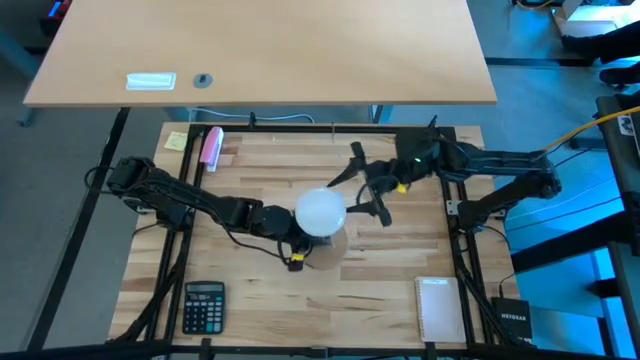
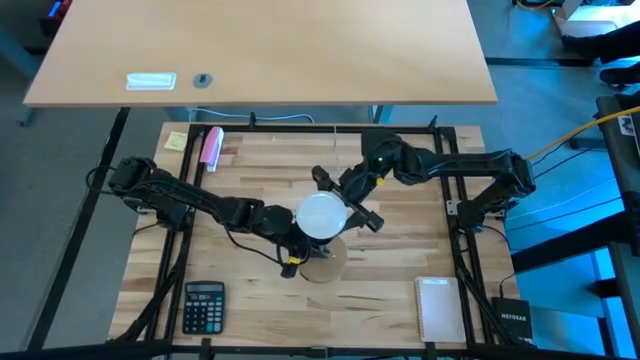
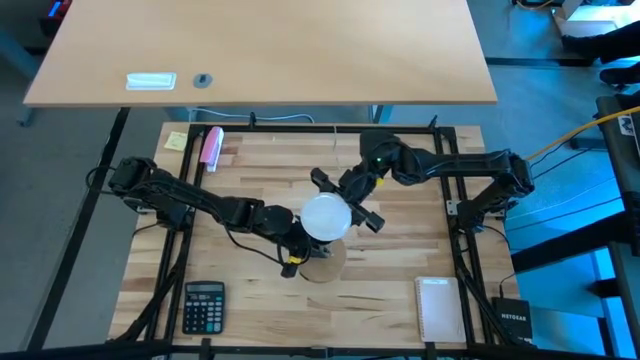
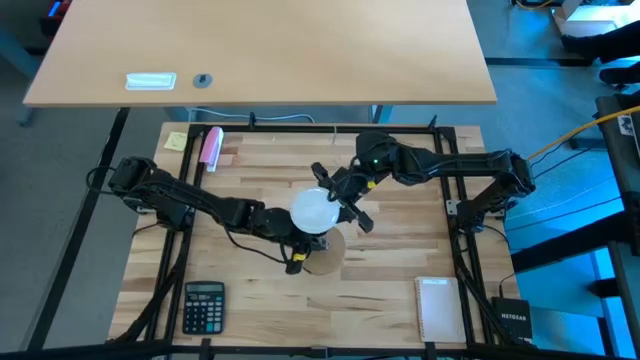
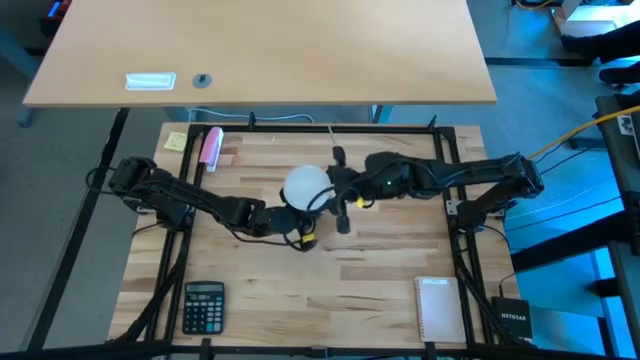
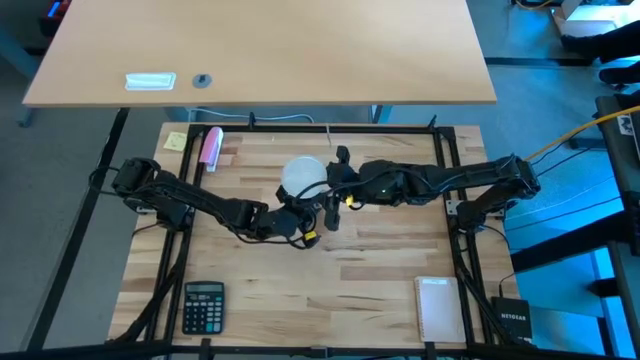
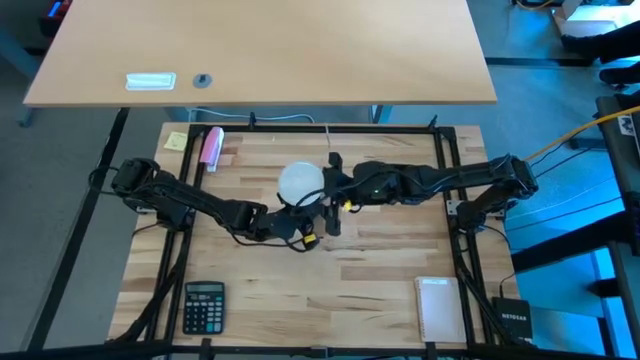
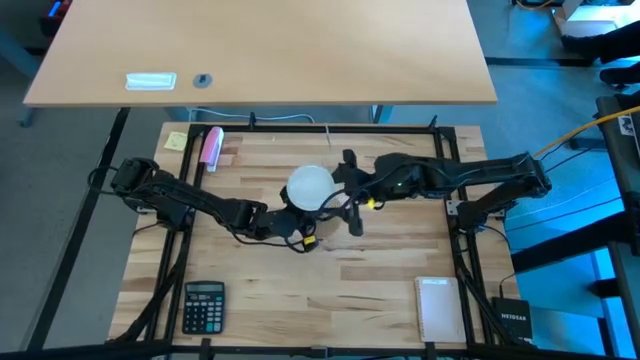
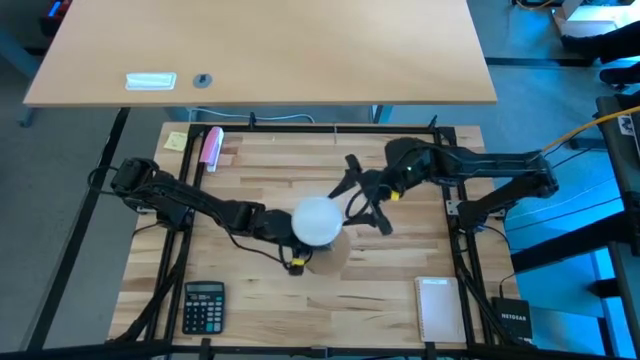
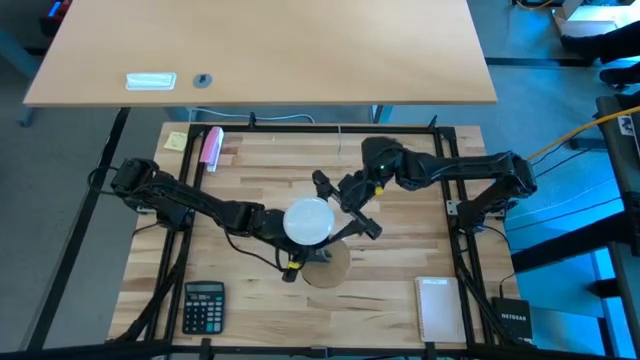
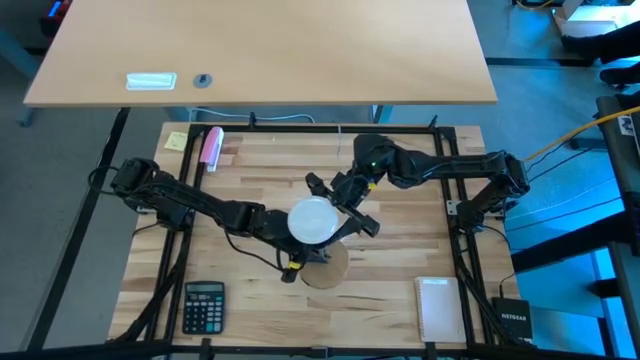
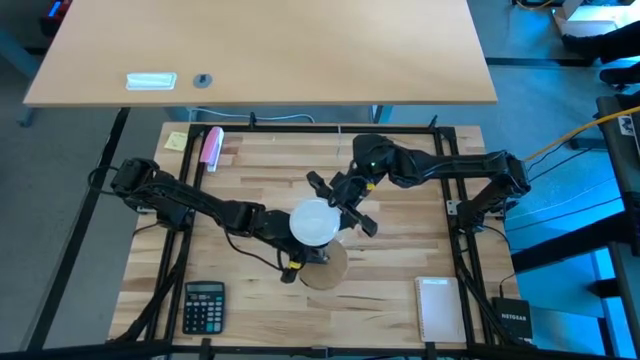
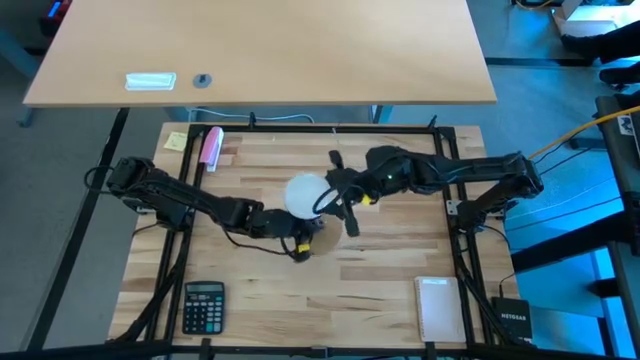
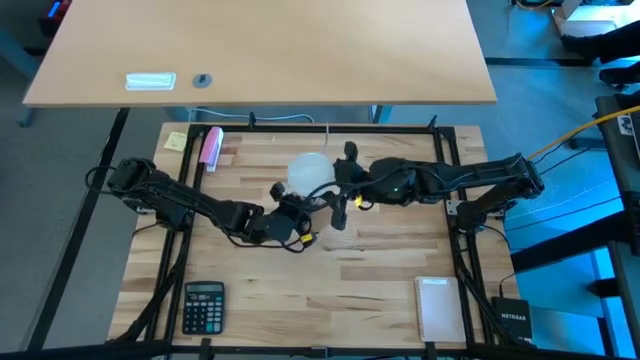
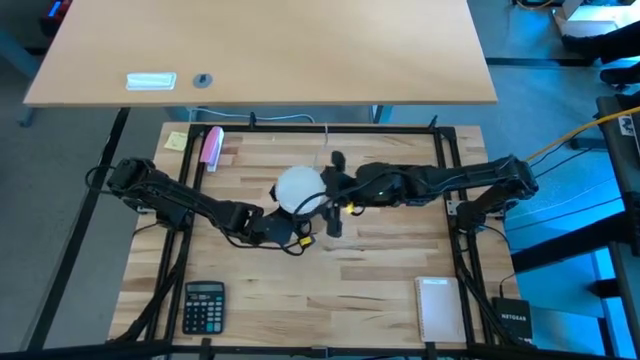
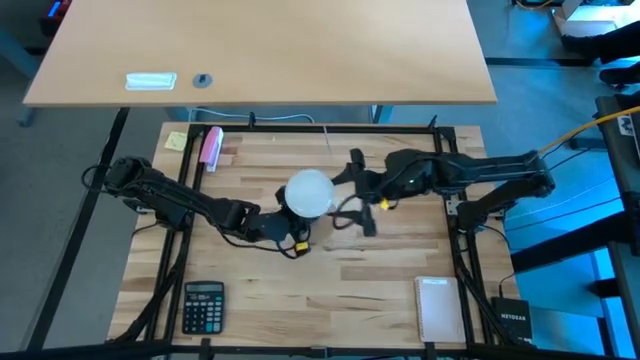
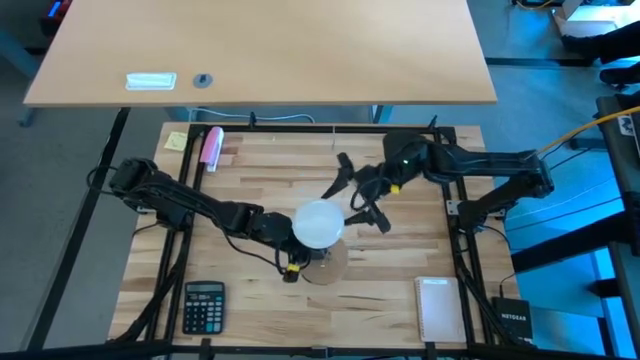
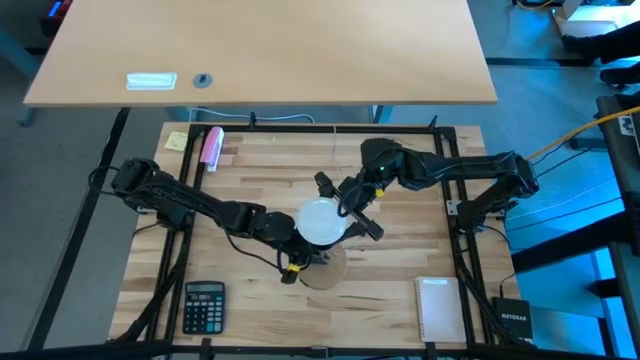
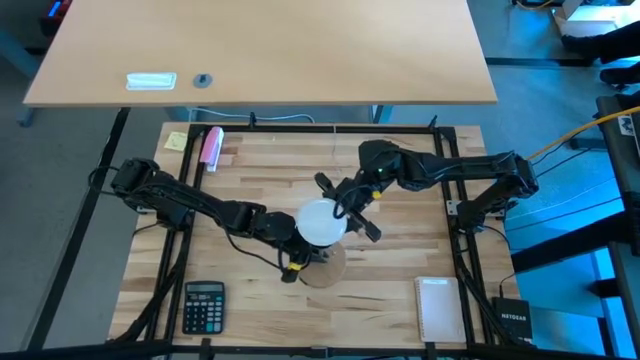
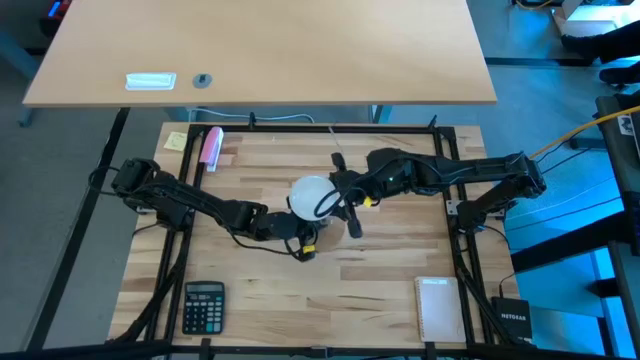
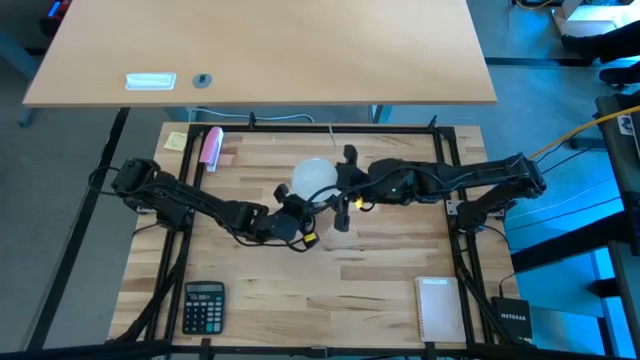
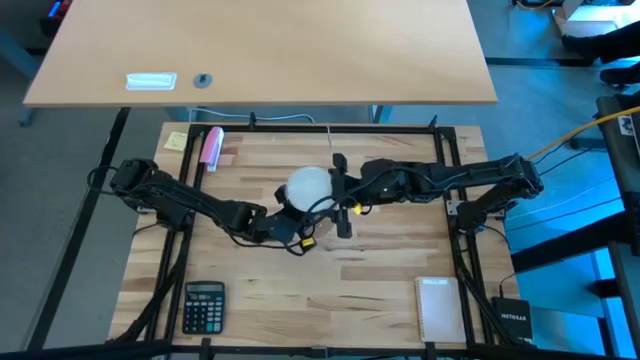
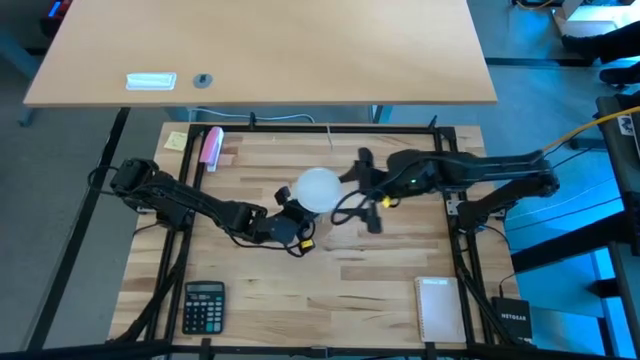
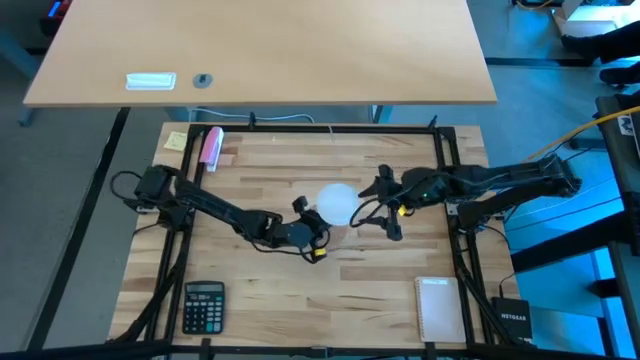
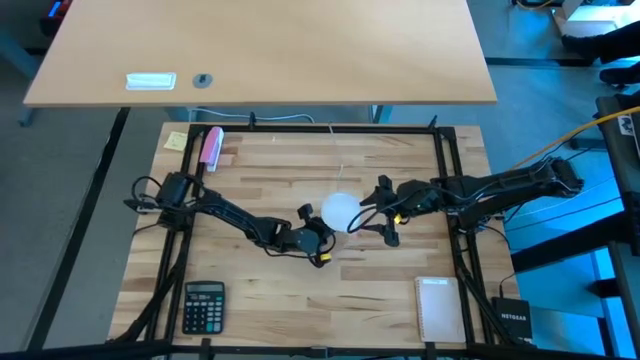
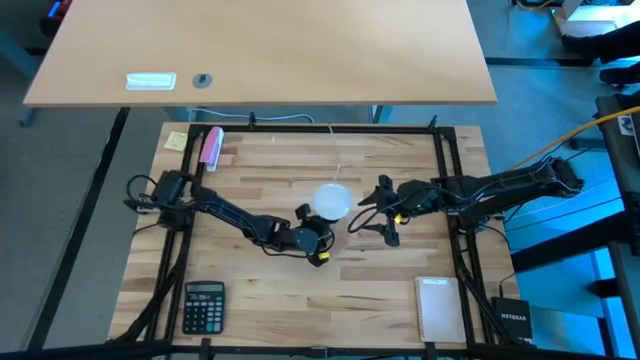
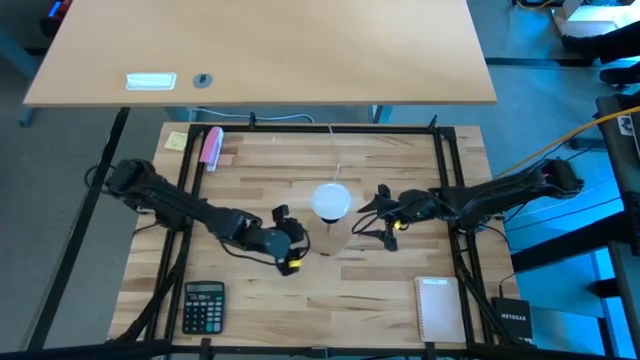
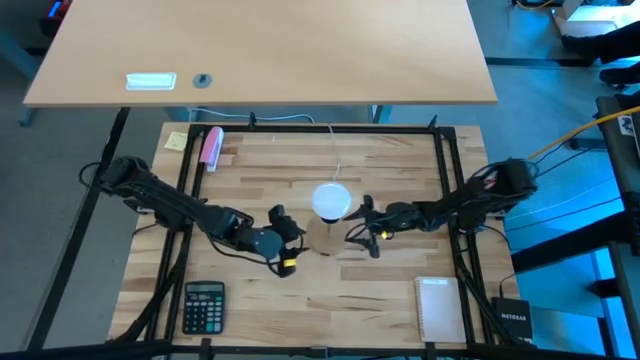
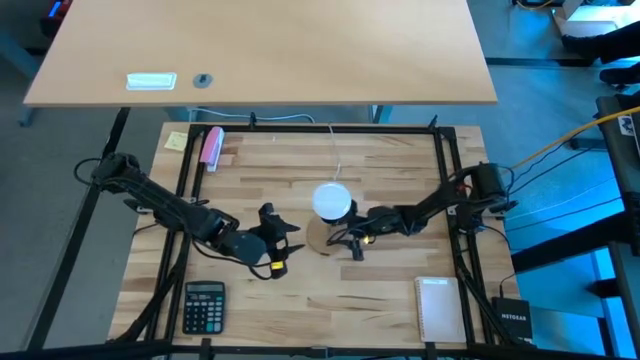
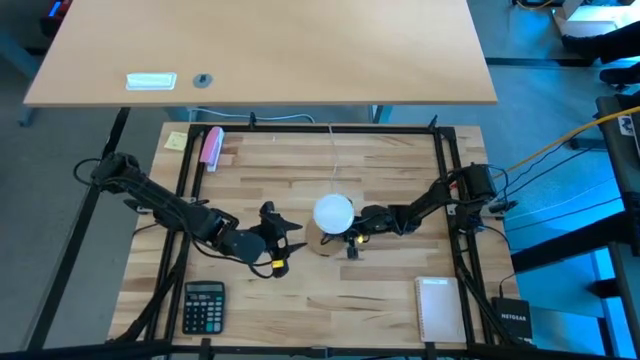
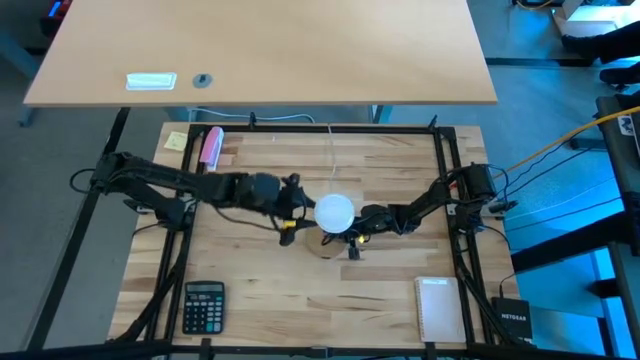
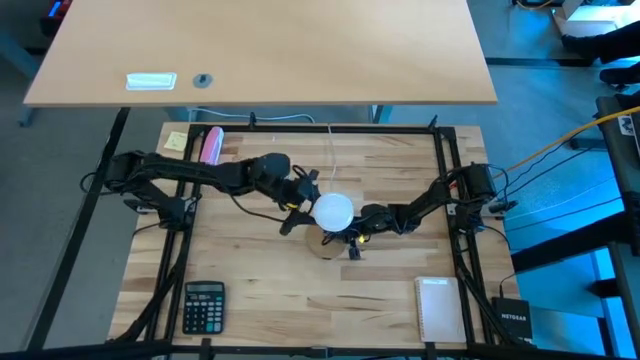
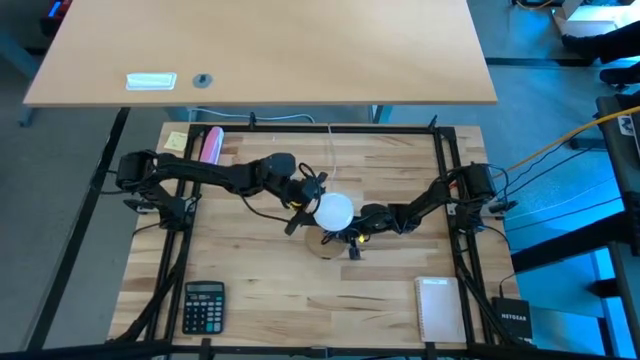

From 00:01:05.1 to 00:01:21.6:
Task: Screw lightbulb
Insert the white lightbulb into the lamp

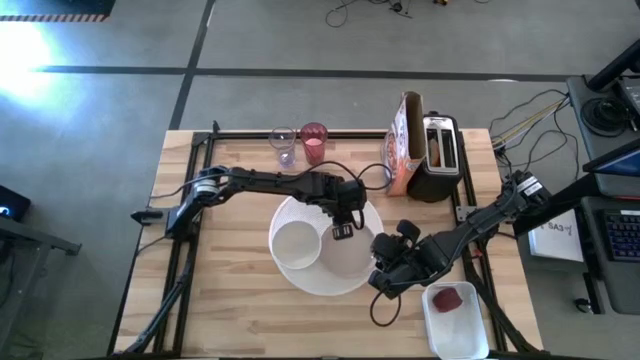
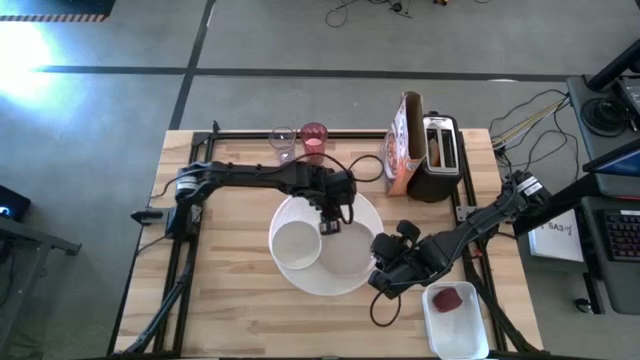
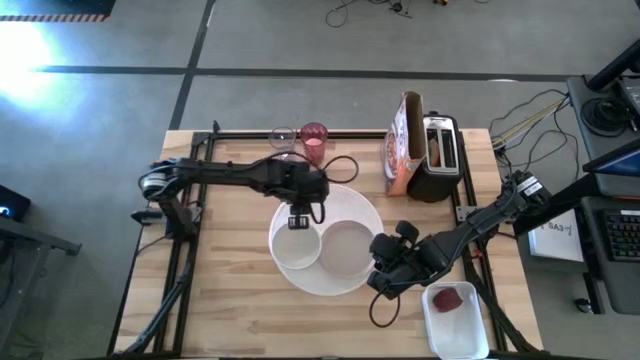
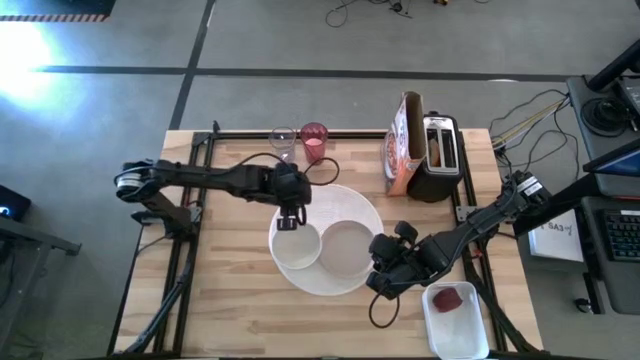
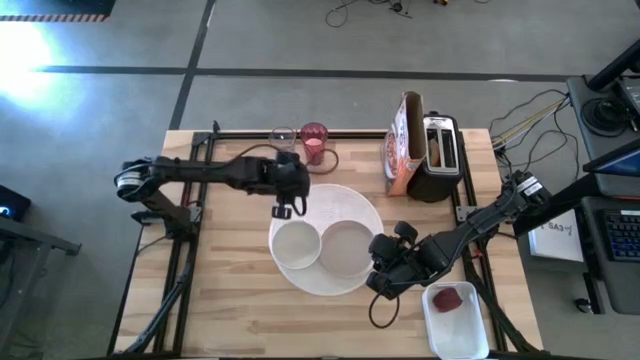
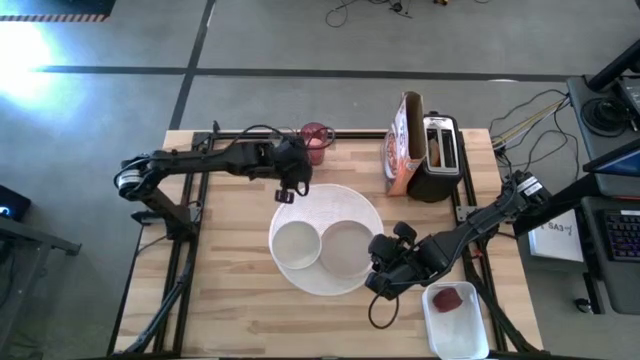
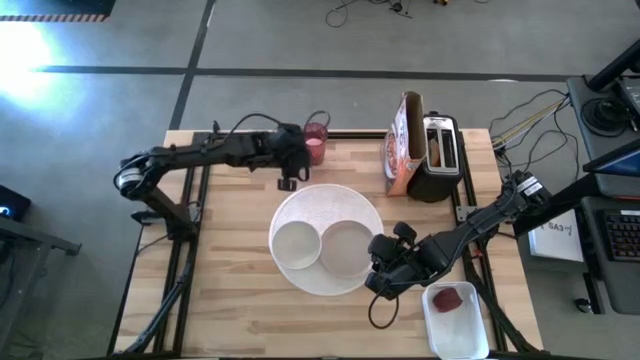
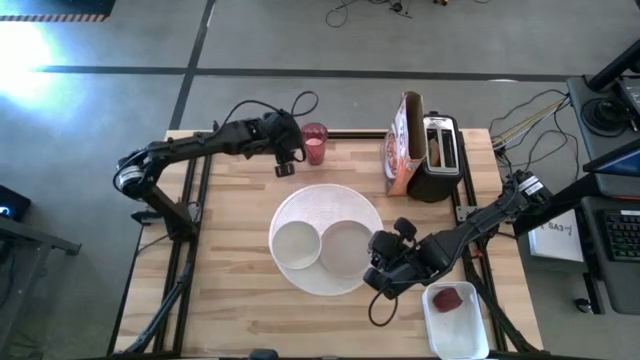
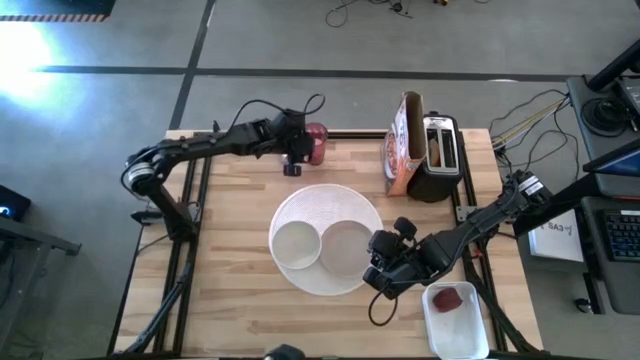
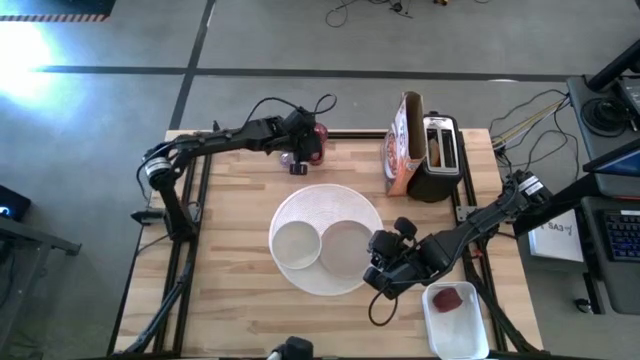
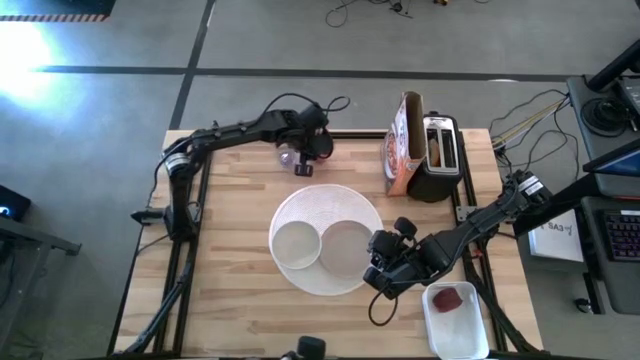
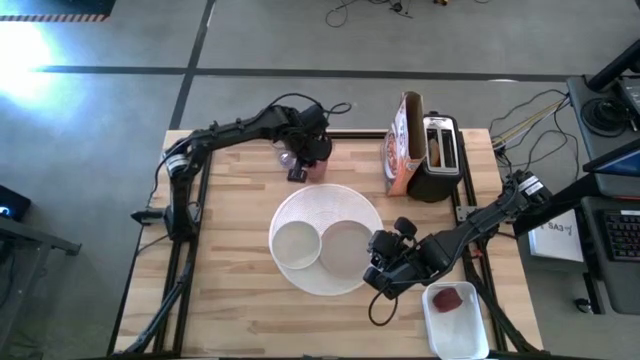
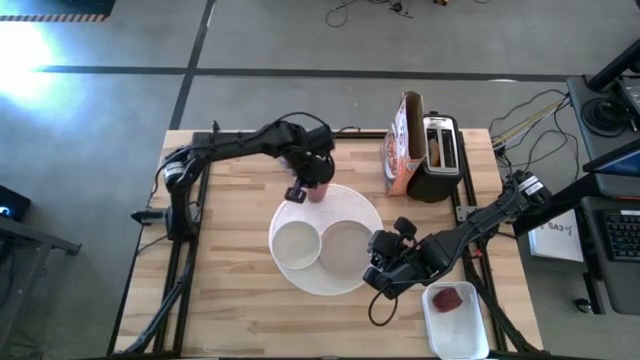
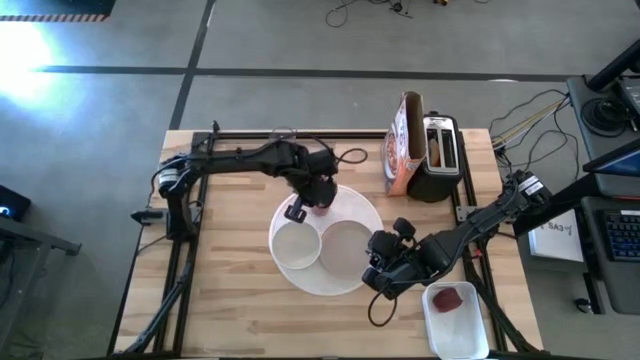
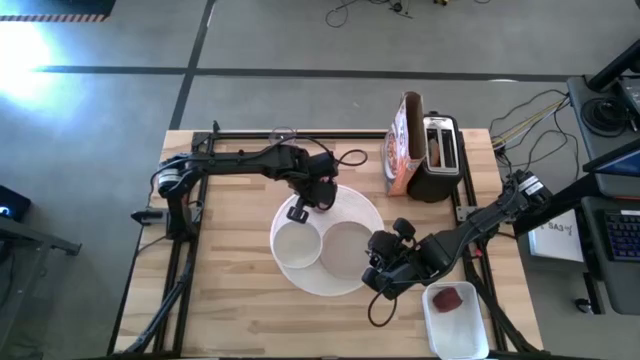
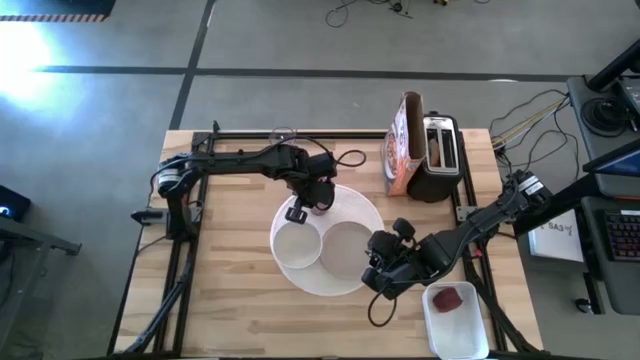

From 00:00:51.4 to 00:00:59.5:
Task: Arrange a breakfast setting
Put the red cup to the top left of the white bowl on the white table mat
